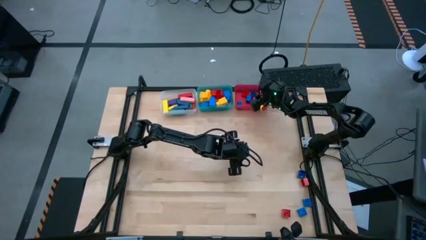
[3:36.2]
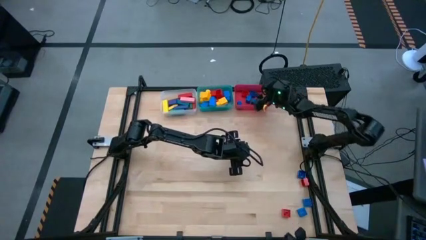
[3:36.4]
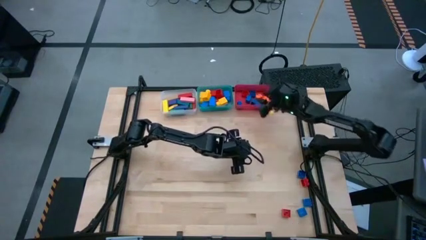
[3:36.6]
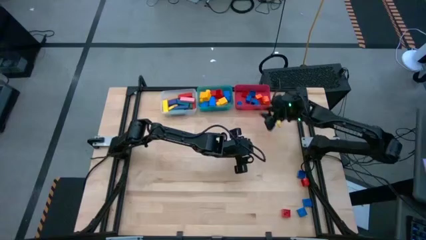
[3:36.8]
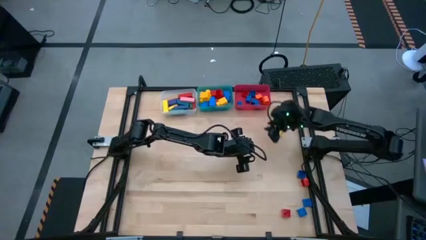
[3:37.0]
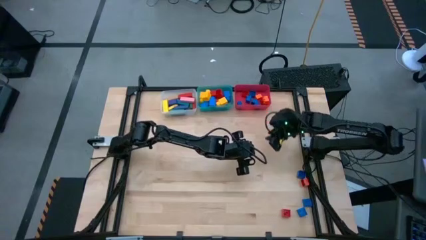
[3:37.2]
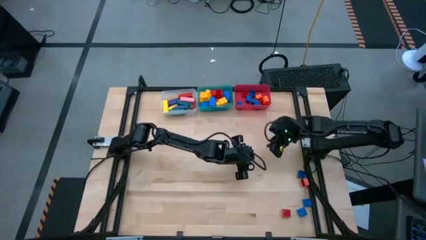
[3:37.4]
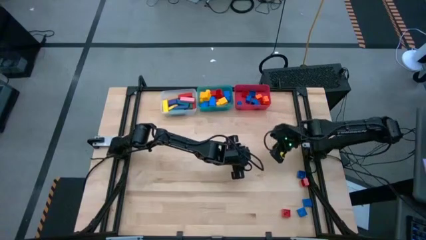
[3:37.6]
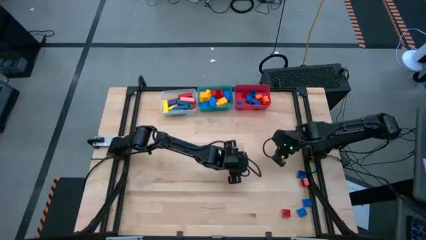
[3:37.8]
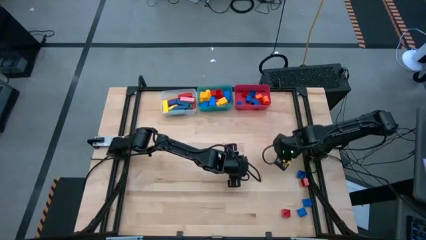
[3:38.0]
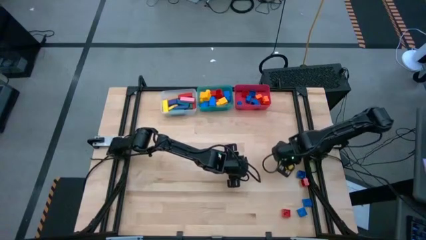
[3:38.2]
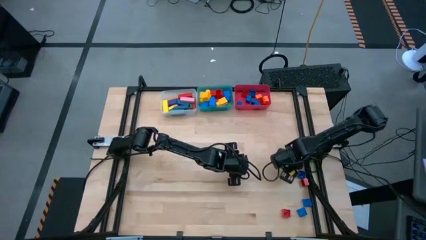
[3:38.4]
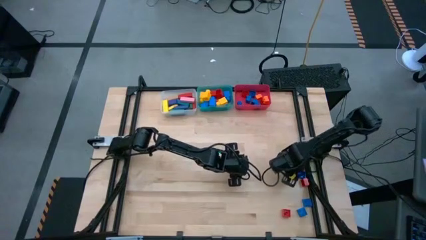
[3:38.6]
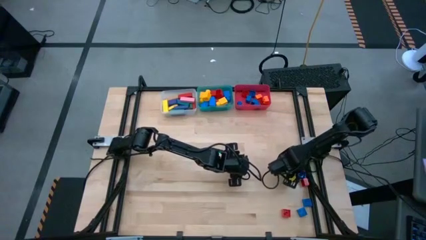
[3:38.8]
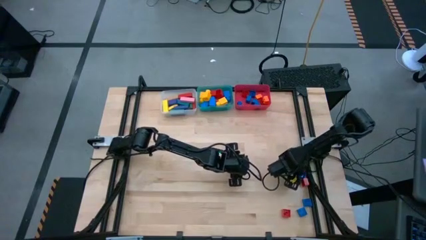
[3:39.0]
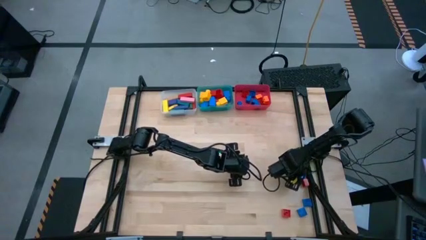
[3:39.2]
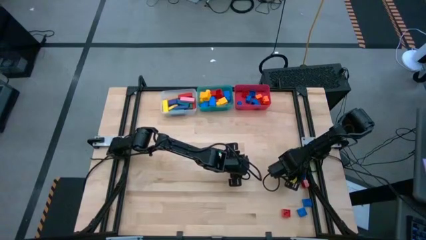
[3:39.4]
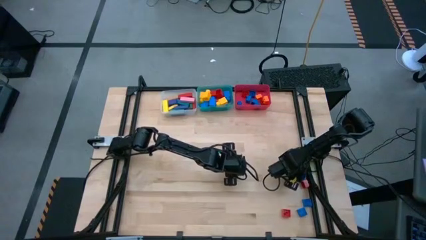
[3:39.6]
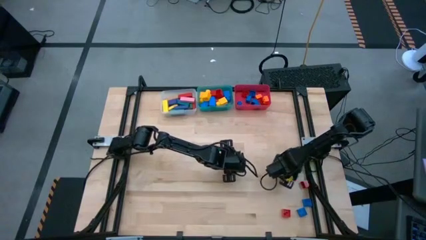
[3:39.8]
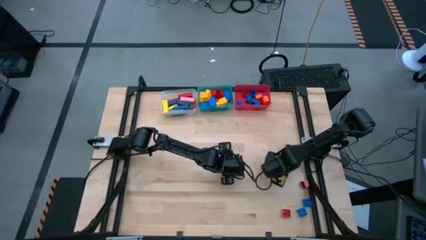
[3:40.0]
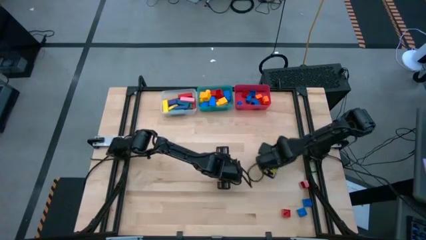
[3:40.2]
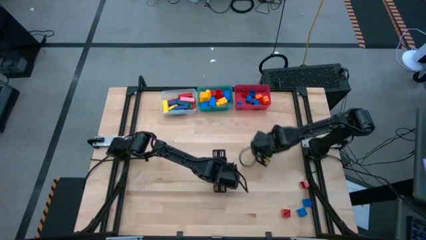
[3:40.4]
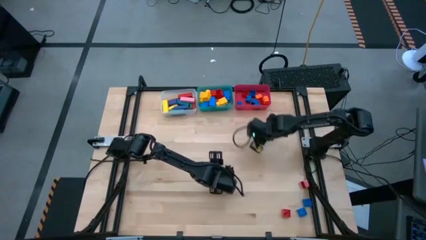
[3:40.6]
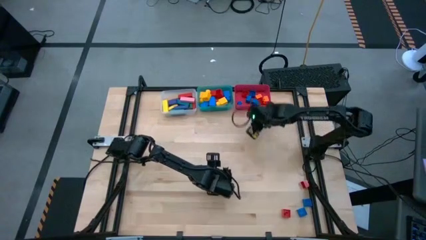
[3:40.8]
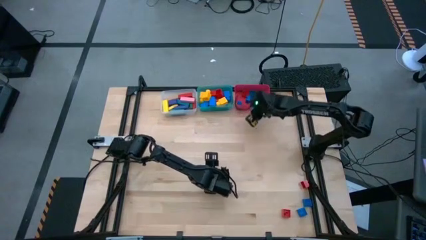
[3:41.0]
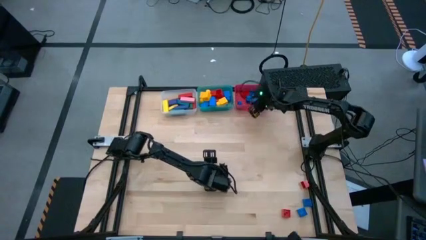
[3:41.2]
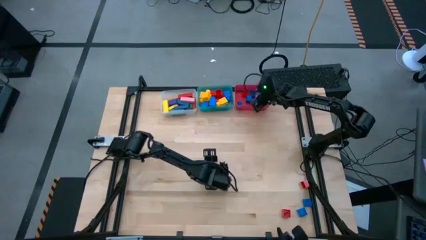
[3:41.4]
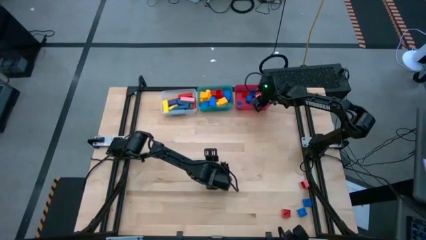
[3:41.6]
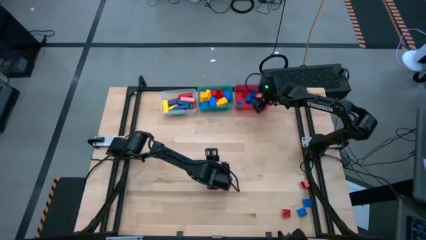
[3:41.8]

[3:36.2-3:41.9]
Task: Sort blocks by size
Put the blue 4 stud game piece into the red bin

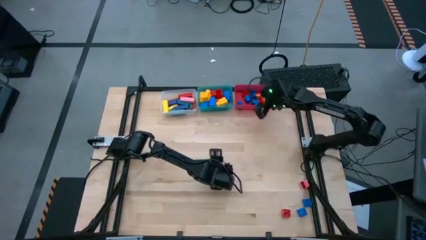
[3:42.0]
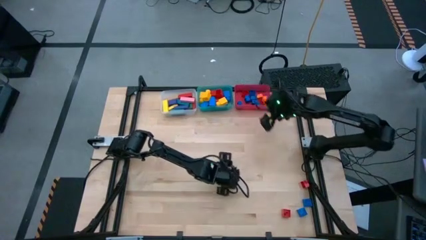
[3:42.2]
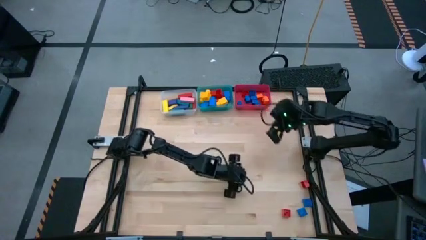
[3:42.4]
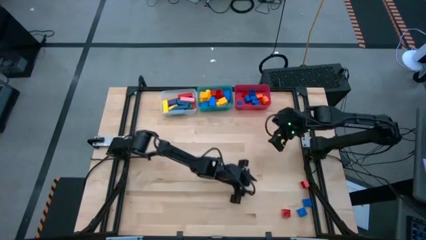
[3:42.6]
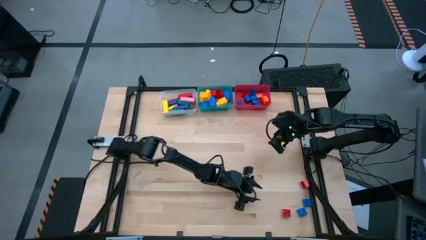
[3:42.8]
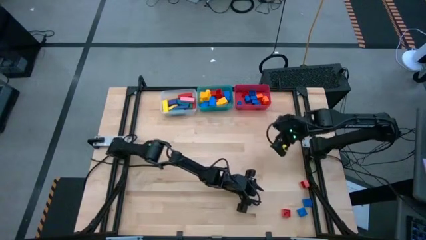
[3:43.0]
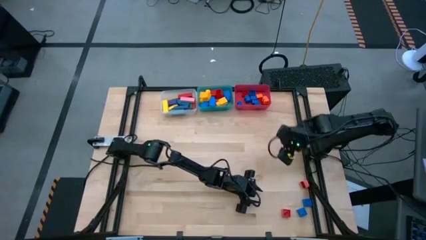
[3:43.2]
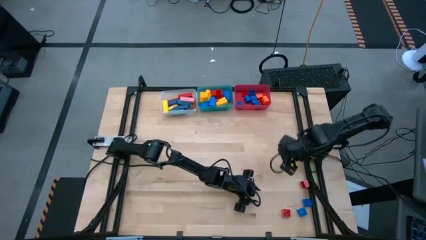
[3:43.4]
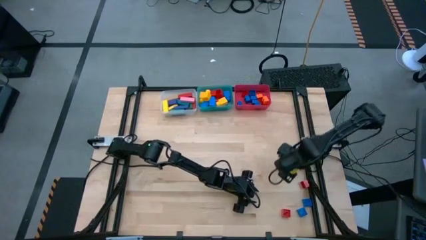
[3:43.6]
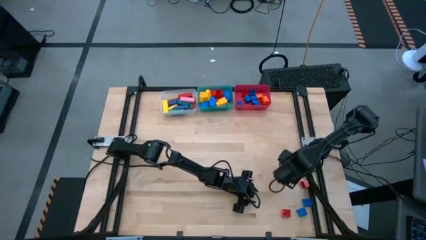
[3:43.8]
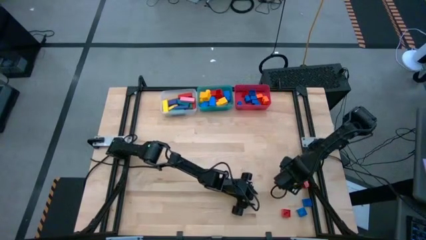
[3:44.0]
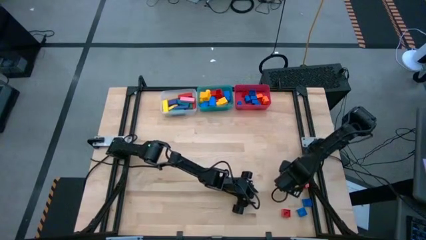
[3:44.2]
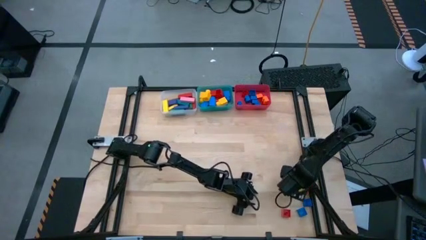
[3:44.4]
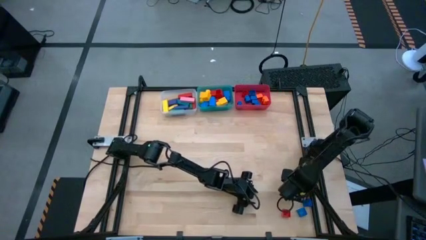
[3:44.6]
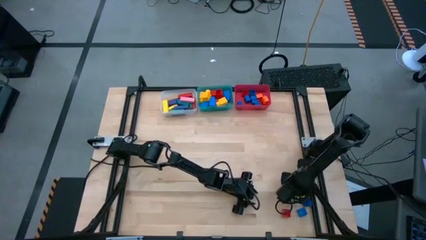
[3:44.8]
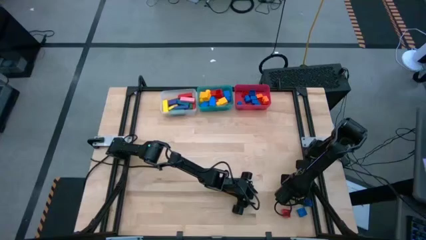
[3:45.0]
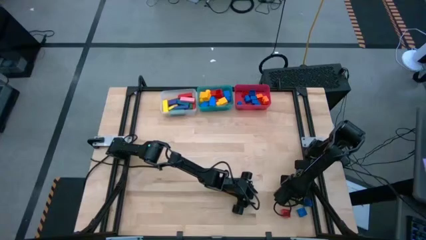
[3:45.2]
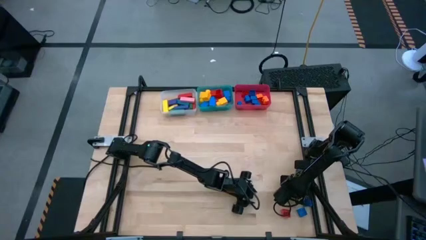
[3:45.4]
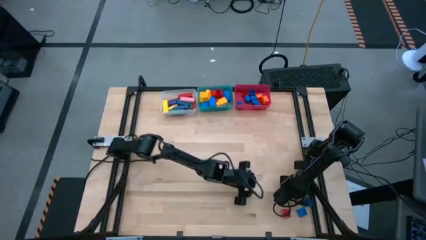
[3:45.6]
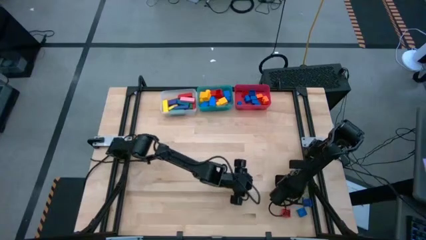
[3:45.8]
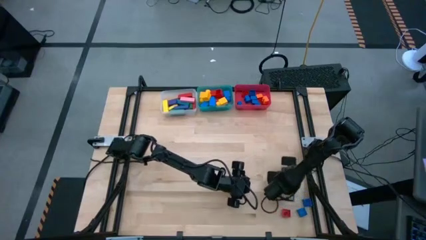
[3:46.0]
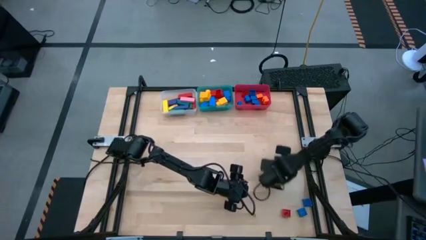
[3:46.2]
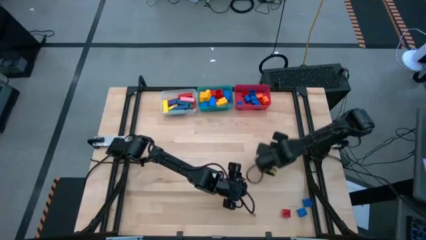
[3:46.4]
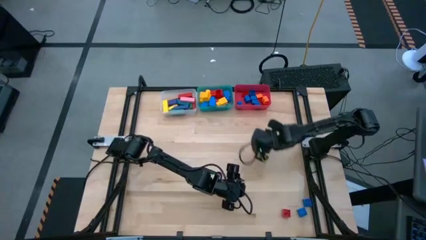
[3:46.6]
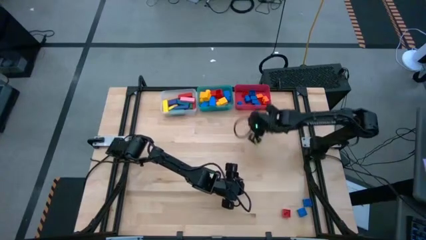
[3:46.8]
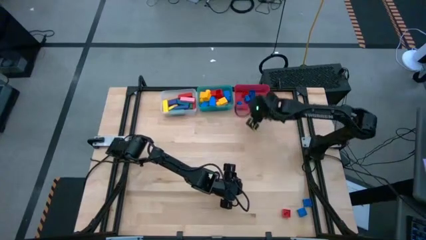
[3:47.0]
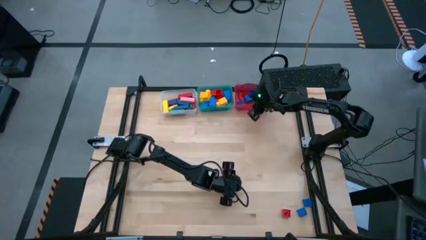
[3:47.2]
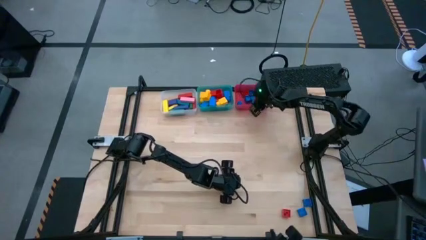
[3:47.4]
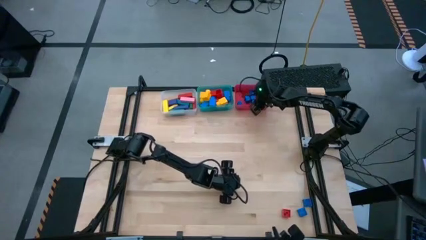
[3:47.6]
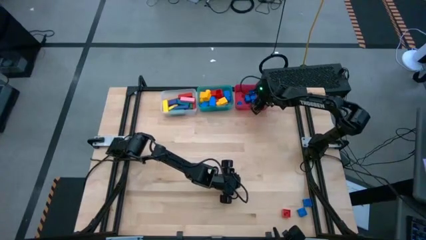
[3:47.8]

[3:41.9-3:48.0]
Put the red 4 stud game piece into the red bin

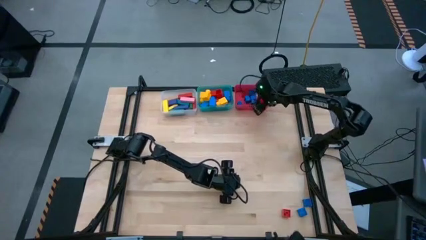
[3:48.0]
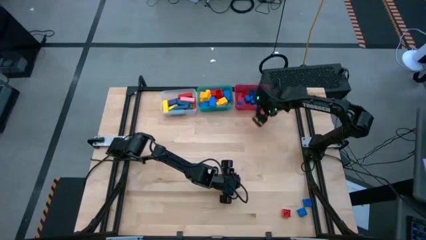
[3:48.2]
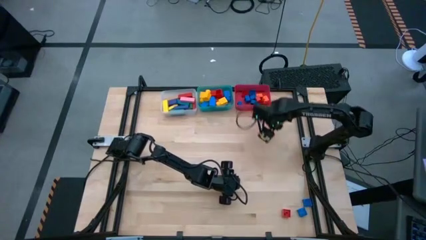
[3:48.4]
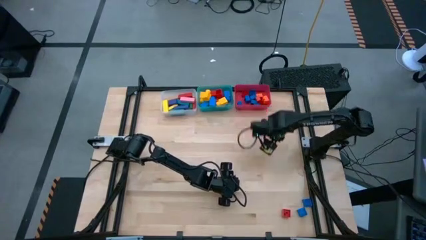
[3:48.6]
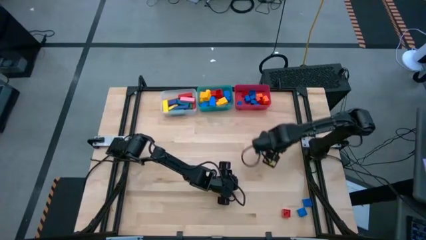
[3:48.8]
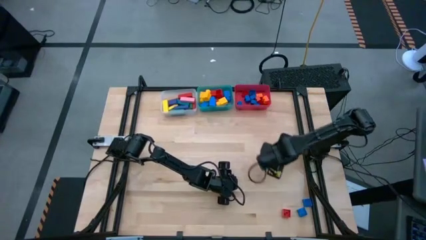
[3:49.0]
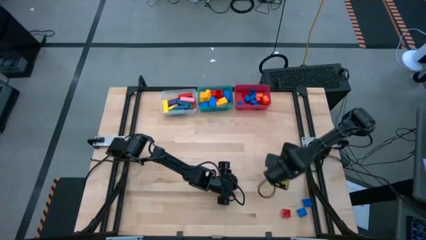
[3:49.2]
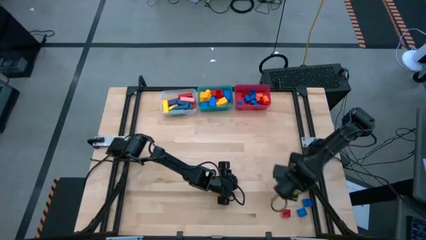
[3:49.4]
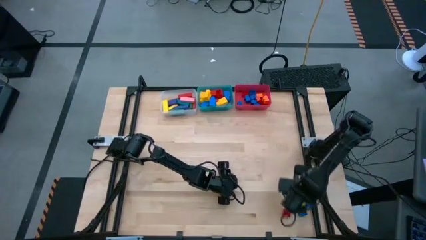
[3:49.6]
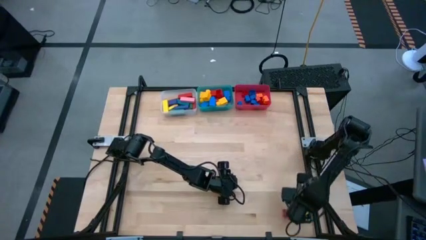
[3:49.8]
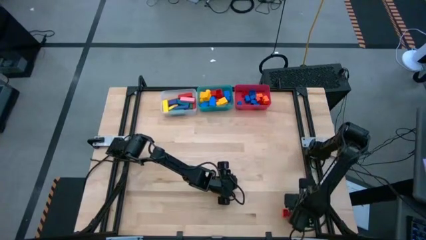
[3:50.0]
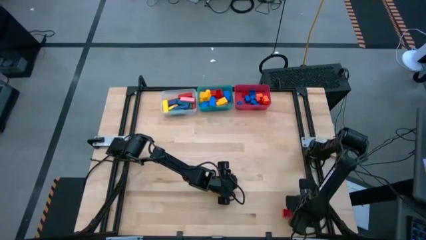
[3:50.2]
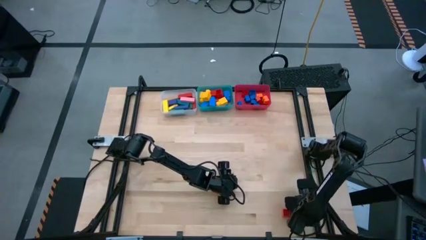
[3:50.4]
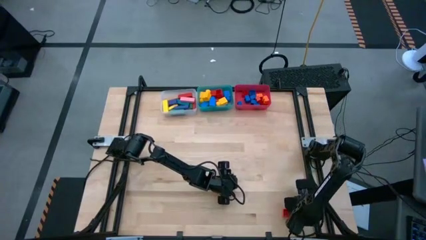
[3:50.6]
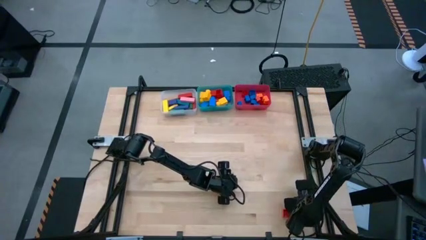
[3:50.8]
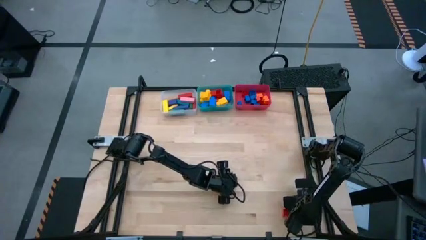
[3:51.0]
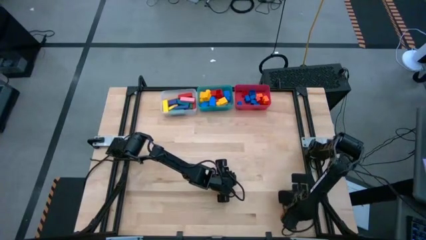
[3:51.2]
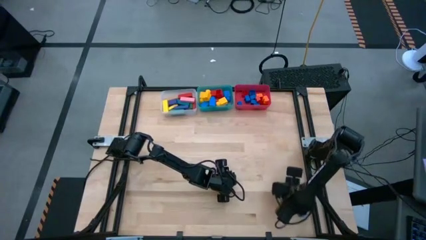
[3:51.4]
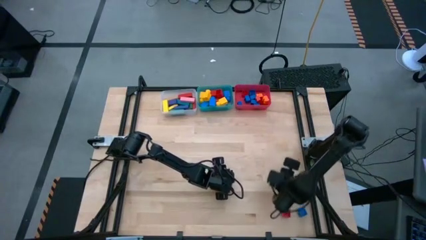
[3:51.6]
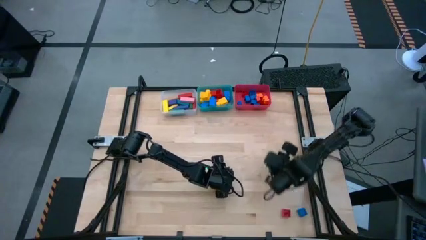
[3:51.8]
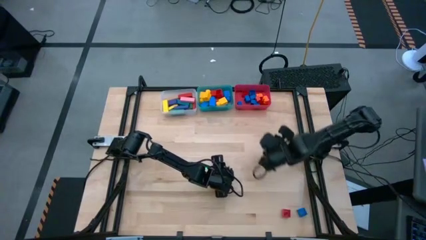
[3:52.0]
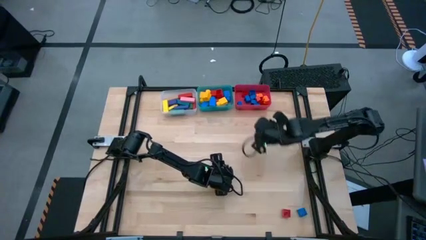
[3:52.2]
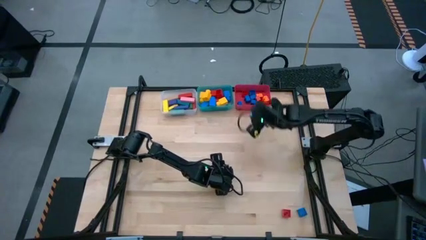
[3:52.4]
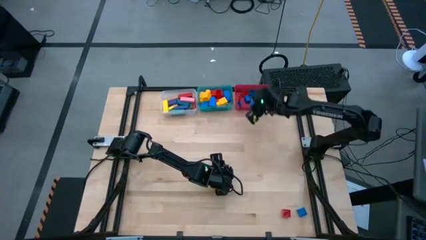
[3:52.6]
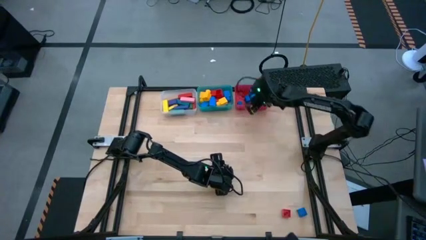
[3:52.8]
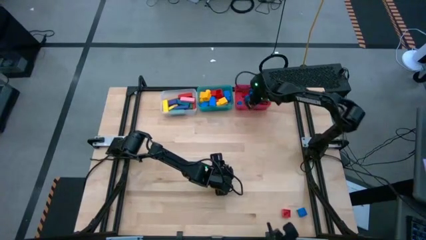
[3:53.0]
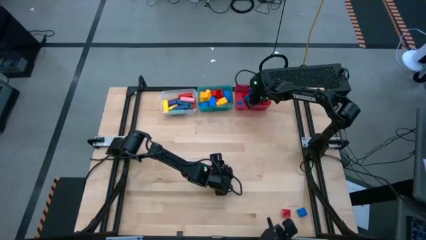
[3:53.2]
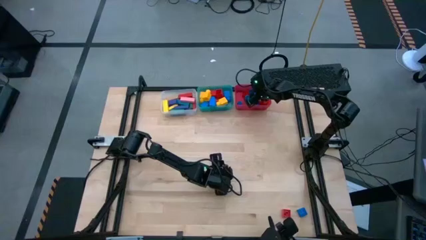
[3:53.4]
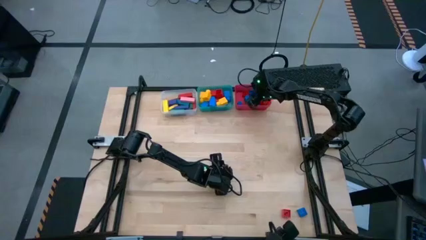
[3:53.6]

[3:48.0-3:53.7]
Put the blue 4 stud game piece into the red bin
